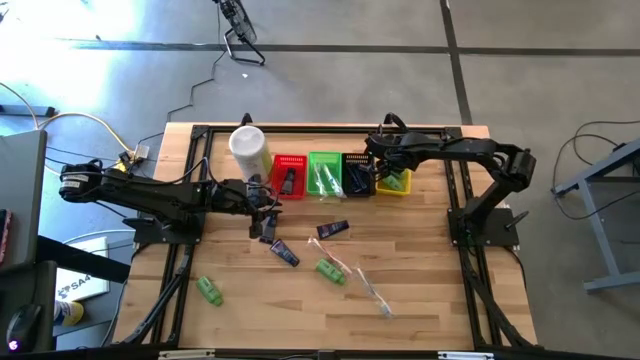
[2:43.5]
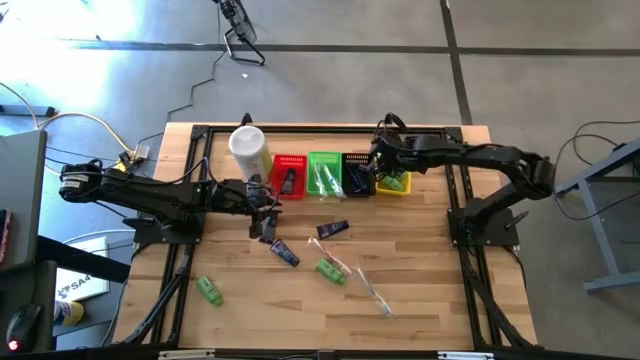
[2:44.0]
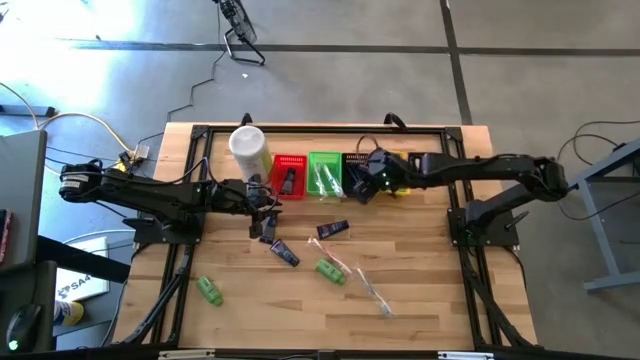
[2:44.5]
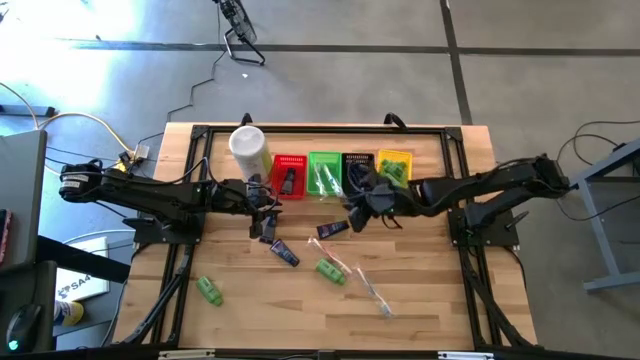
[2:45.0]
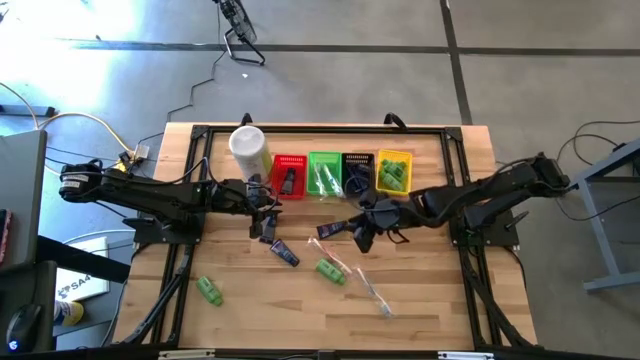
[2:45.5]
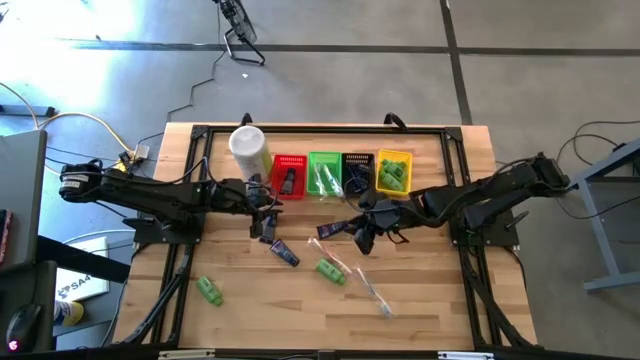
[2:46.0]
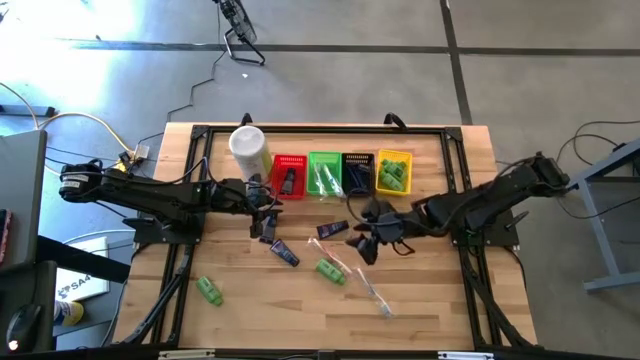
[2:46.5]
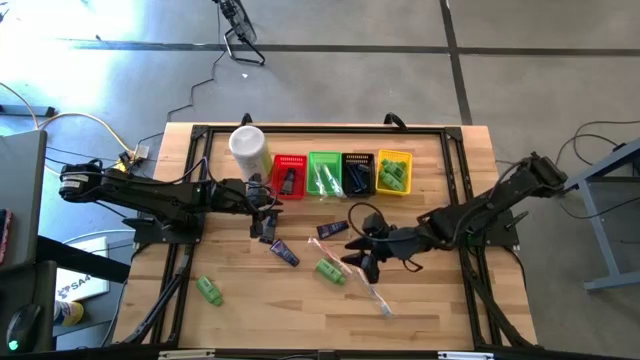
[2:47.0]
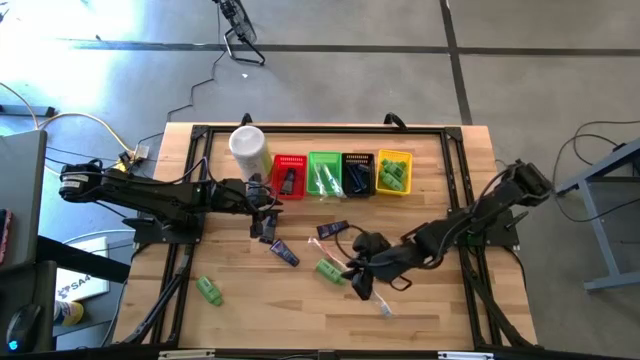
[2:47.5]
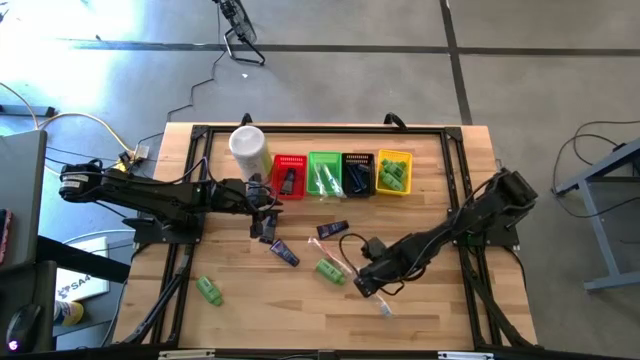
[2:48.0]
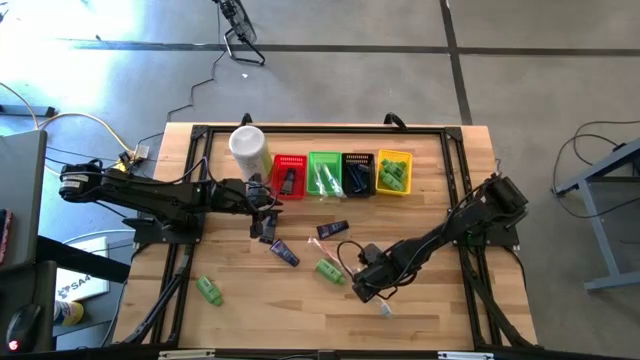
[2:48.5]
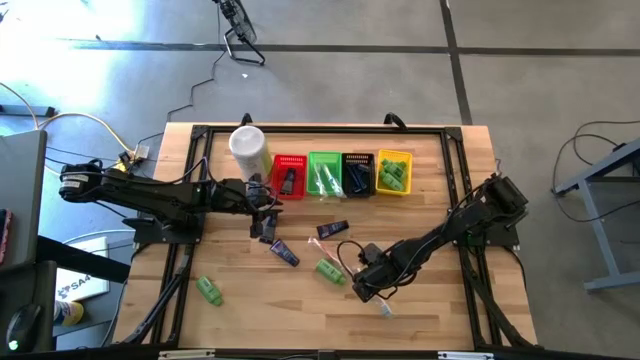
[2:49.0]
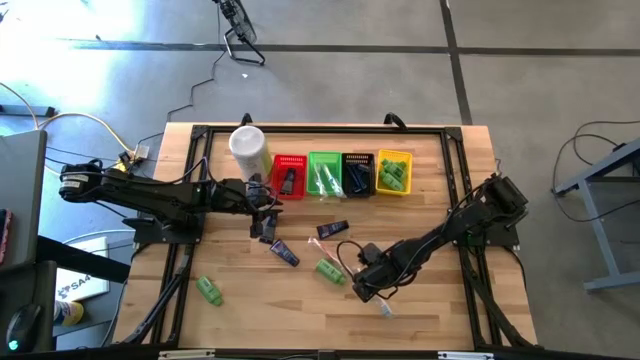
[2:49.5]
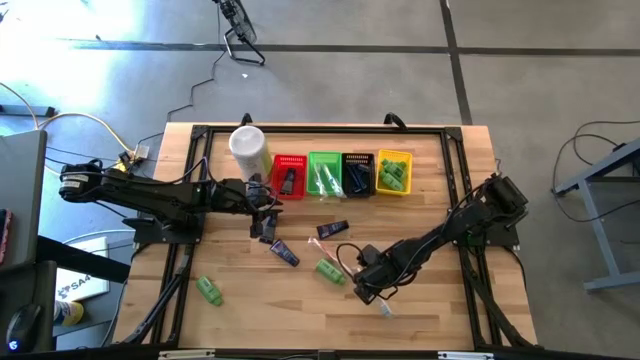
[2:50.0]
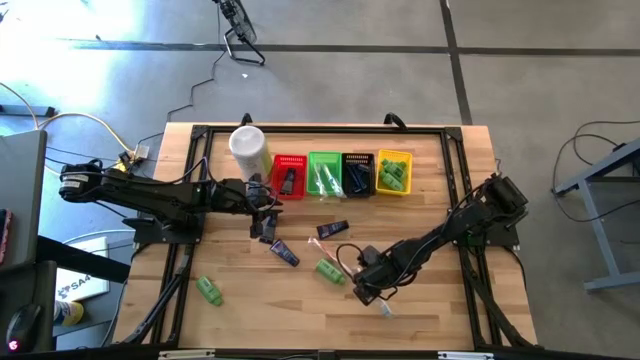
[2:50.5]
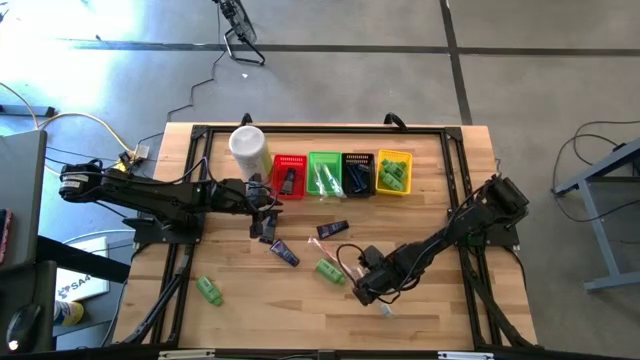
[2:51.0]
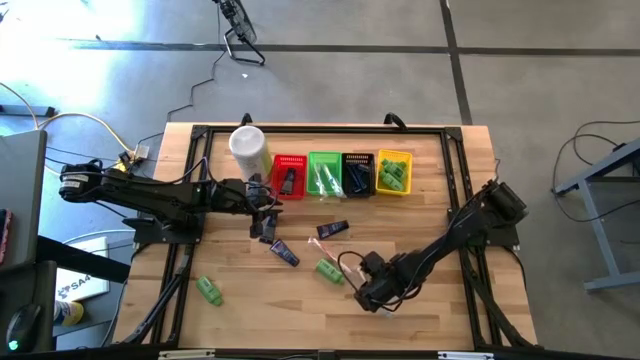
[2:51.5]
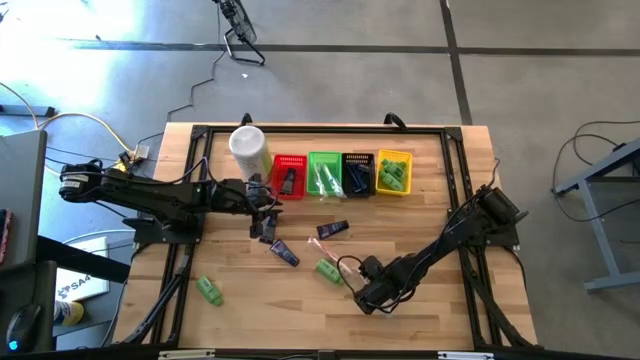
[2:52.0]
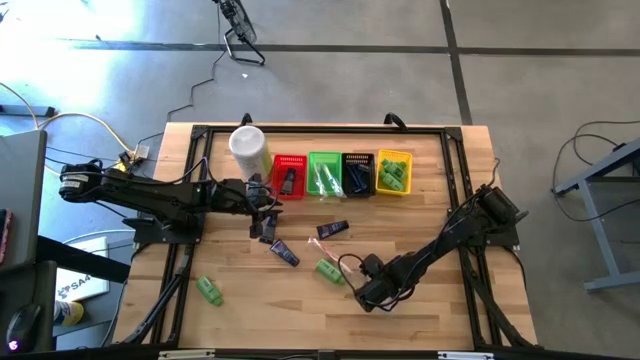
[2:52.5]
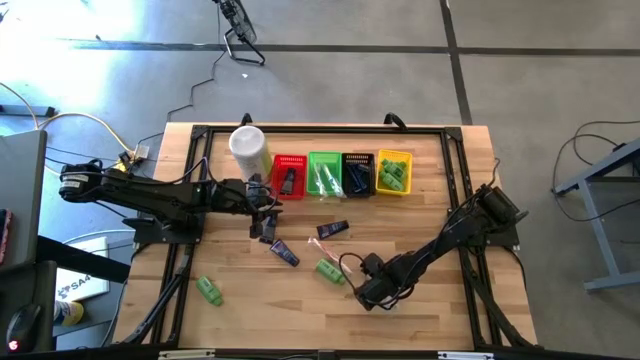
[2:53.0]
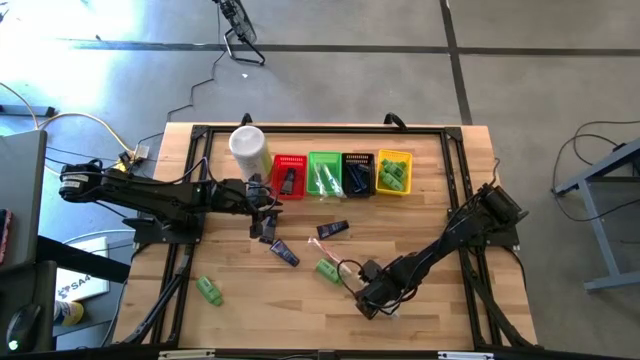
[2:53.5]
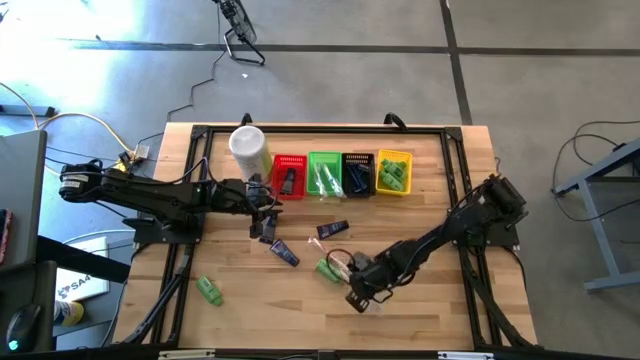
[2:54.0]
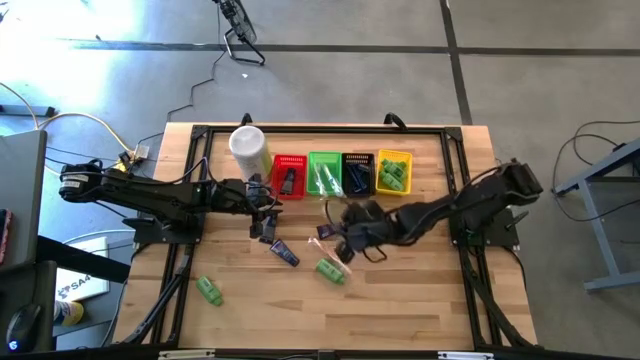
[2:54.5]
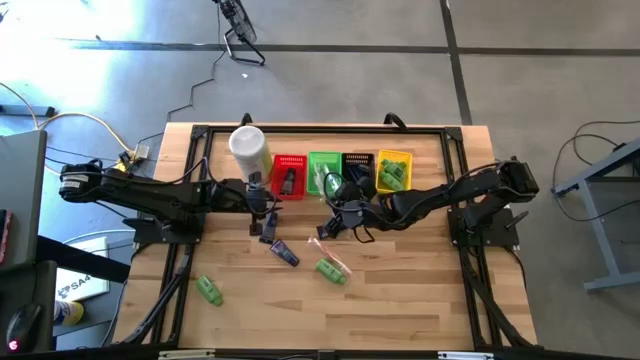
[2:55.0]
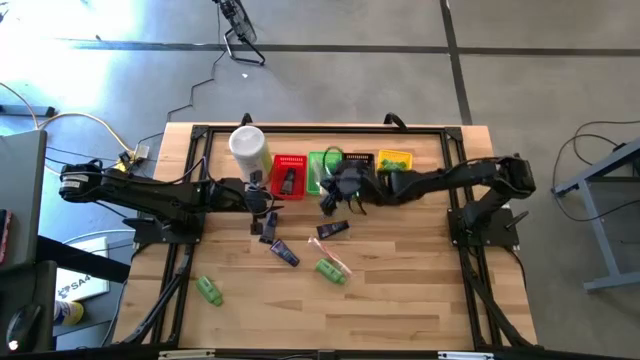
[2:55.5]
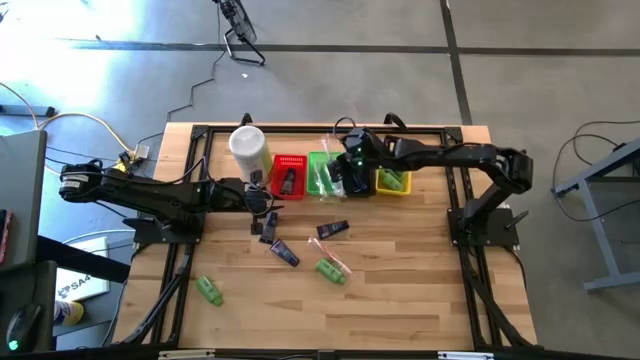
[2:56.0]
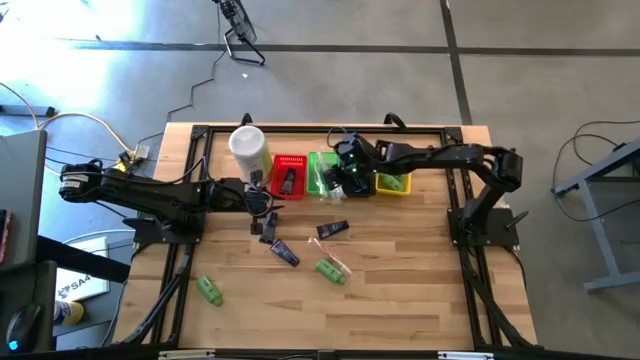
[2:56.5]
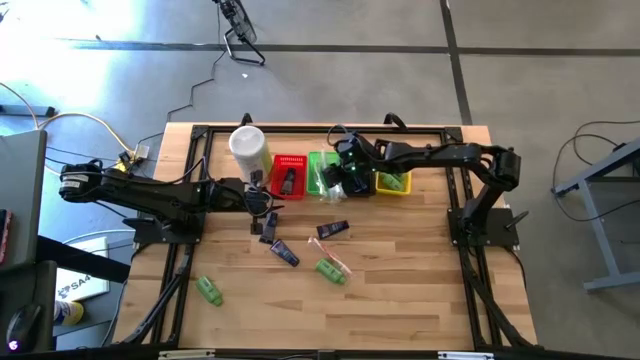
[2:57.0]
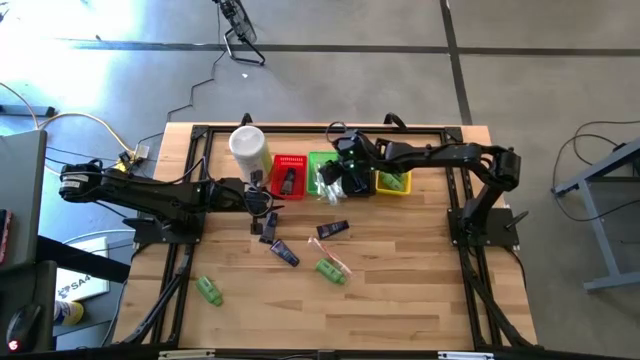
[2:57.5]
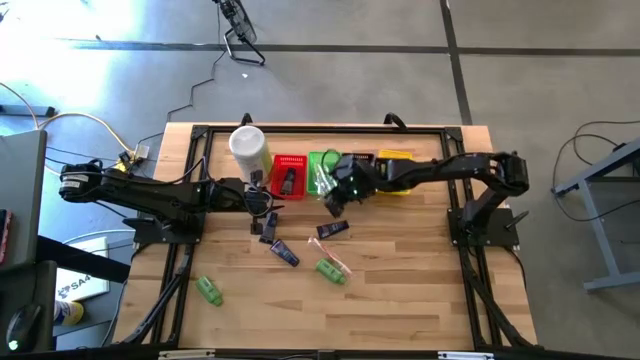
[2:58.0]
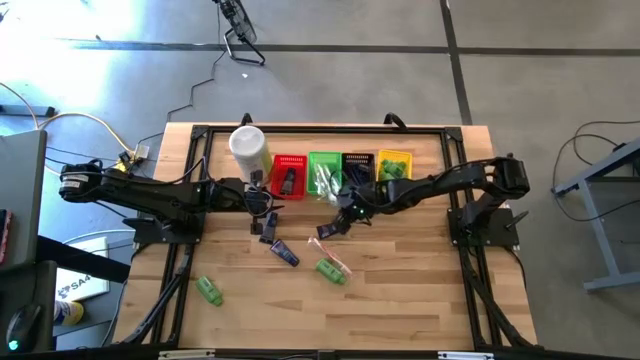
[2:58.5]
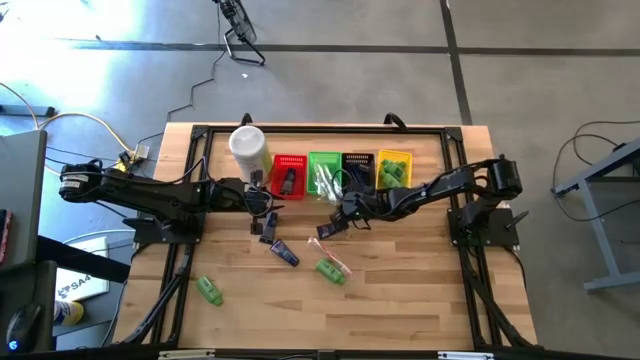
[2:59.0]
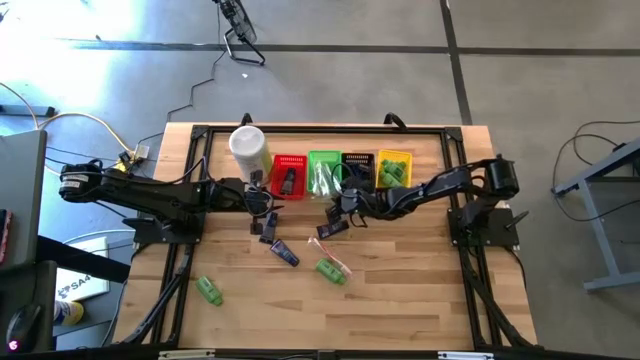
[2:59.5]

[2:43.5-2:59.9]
Task: Pick & Place Travel size toiletries
Put the dark blue toothbrush into the green bin

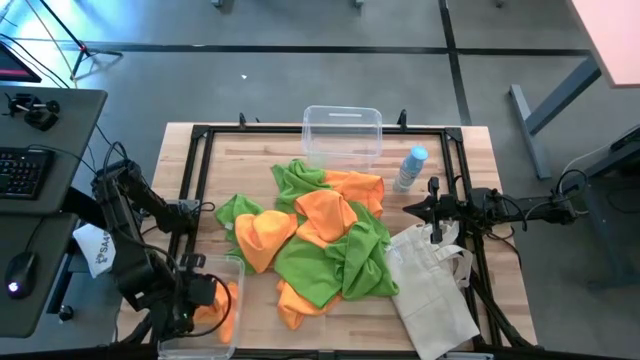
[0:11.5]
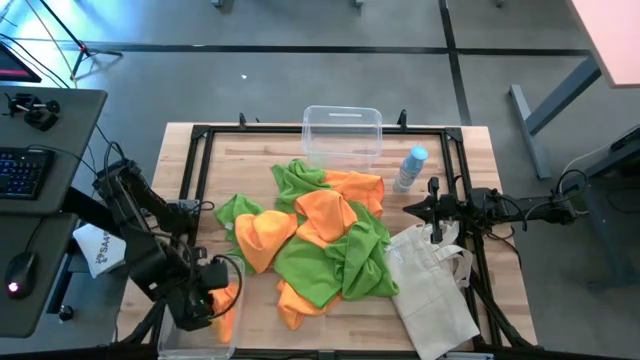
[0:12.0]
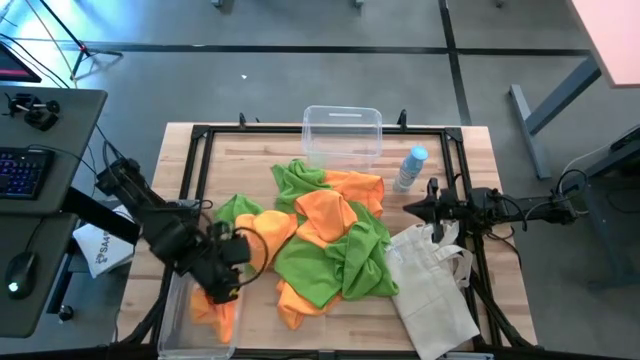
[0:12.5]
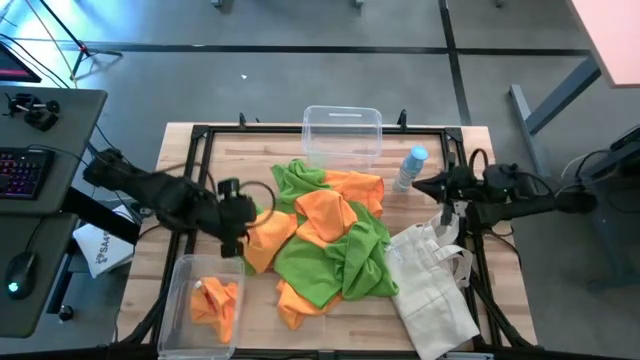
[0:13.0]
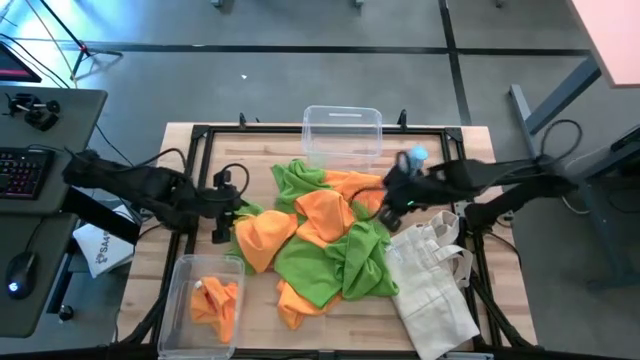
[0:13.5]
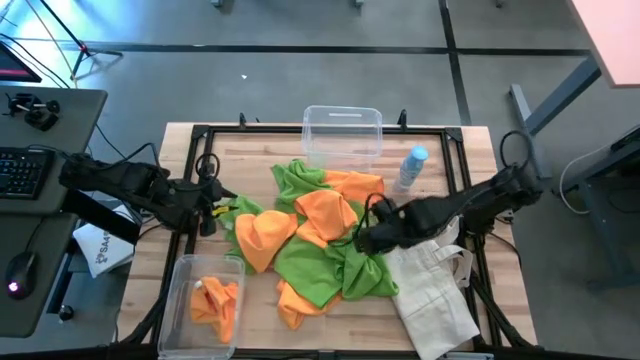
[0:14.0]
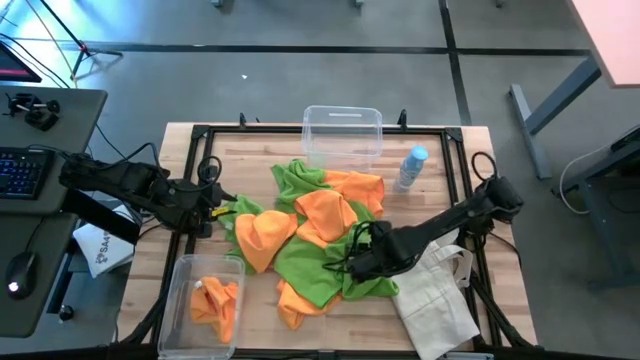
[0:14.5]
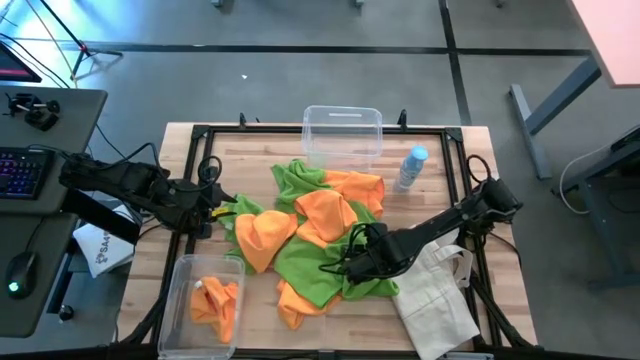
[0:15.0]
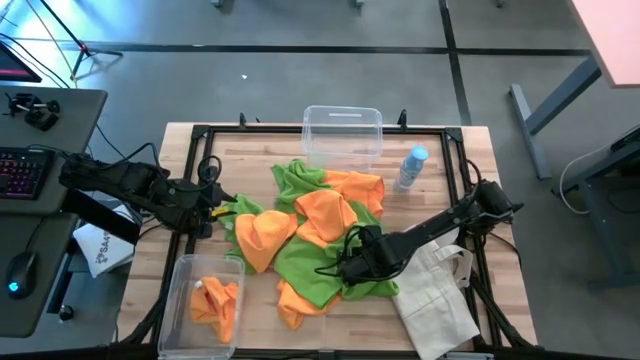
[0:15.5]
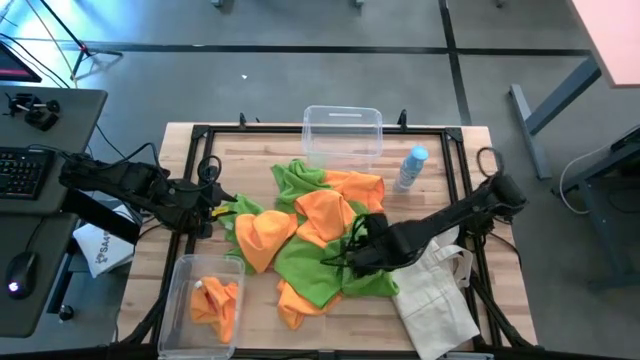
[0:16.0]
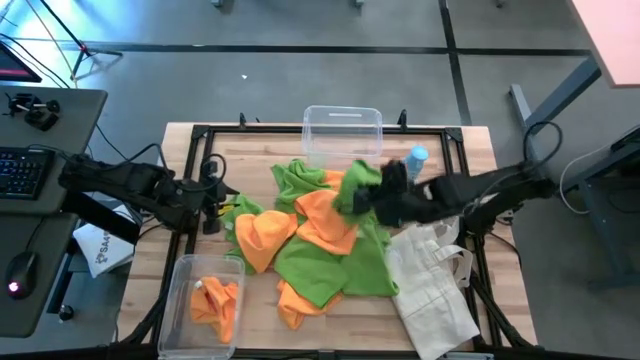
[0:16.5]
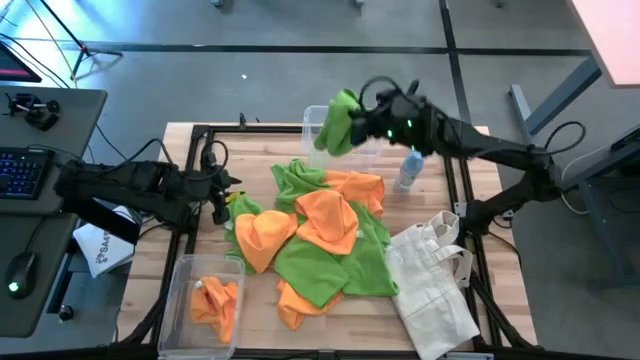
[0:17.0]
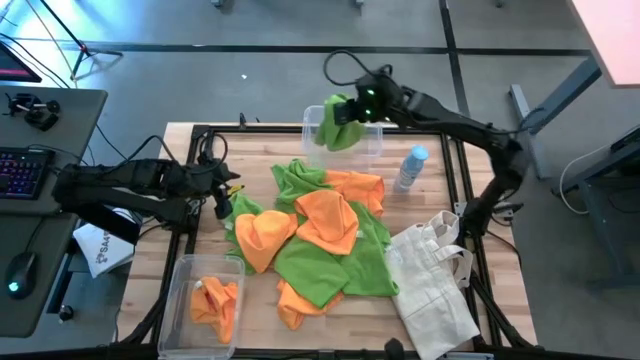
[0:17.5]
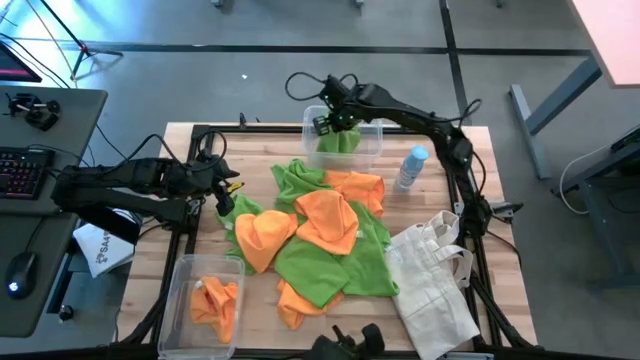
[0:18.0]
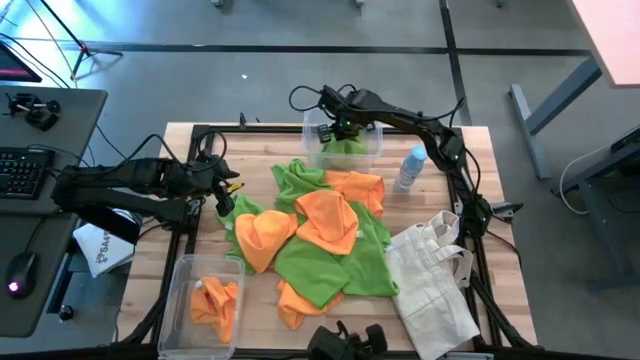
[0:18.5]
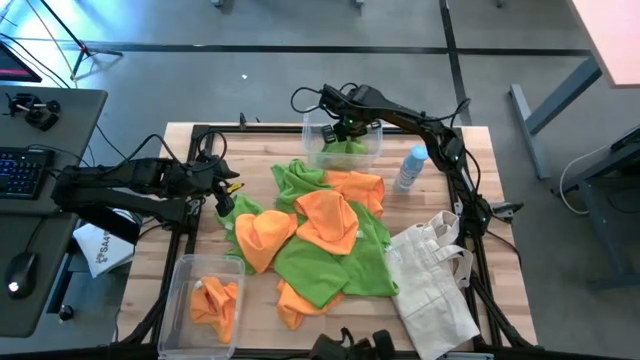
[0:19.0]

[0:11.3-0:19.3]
Task: Sort microfiber towel by color & place in baskets
Put the green microfiber towel into the top transparent bin
